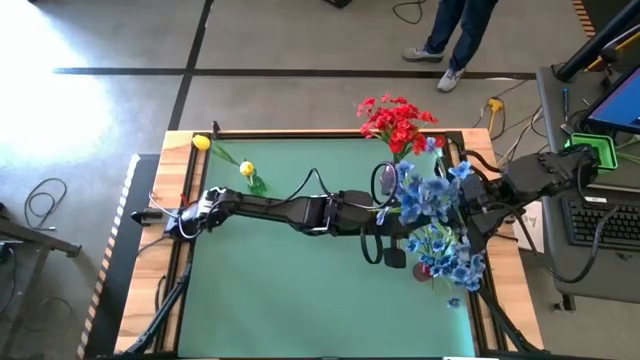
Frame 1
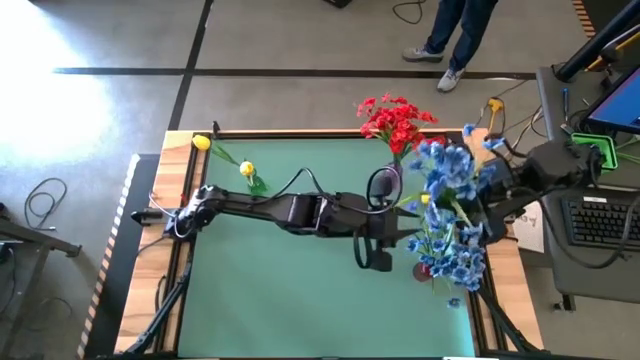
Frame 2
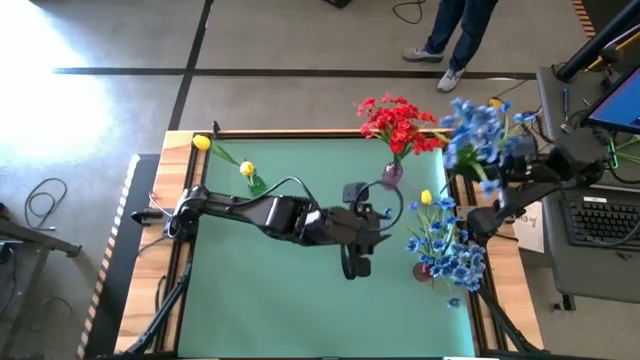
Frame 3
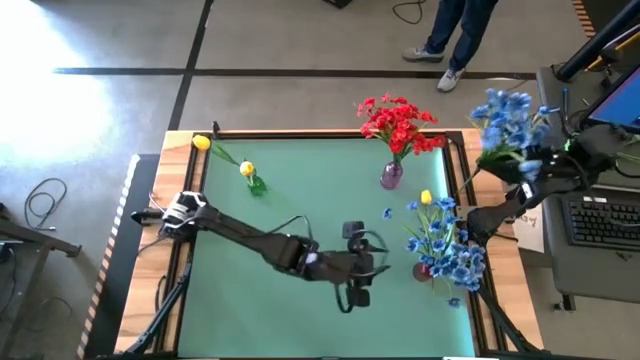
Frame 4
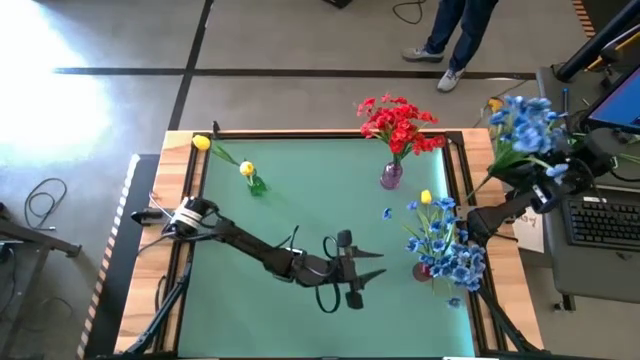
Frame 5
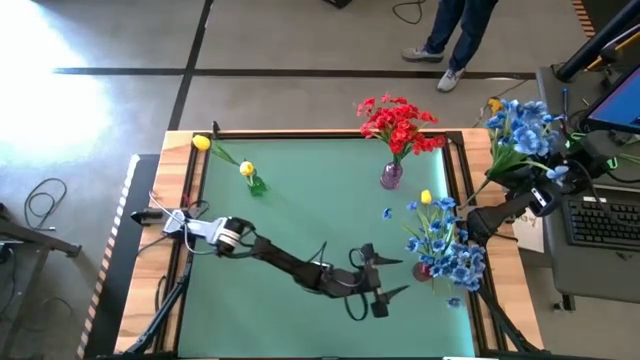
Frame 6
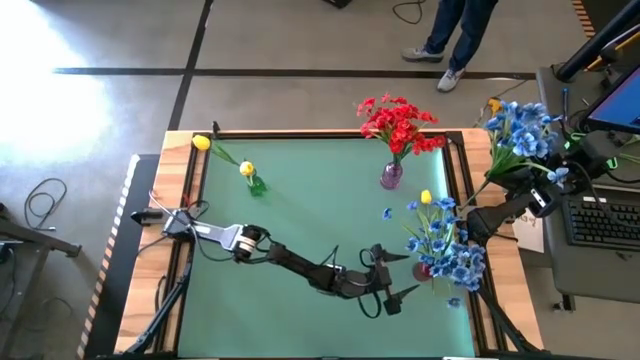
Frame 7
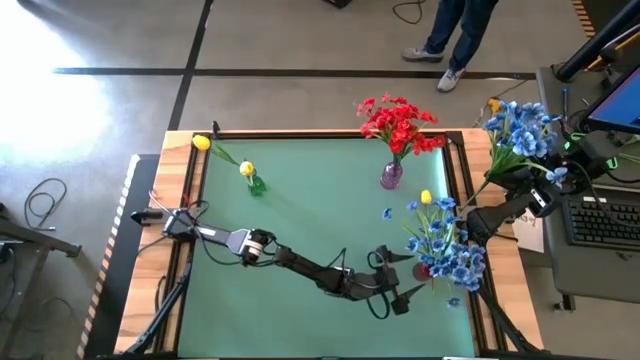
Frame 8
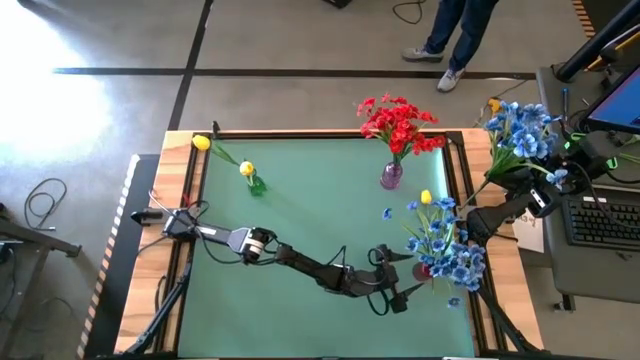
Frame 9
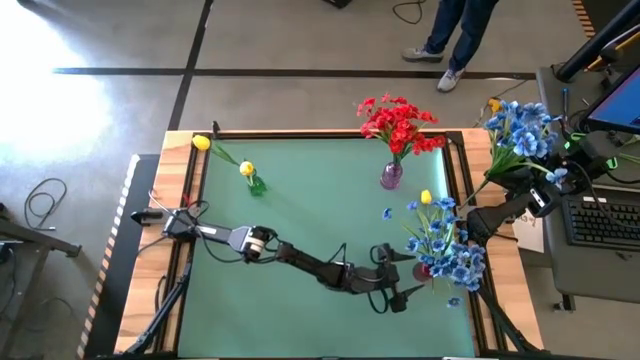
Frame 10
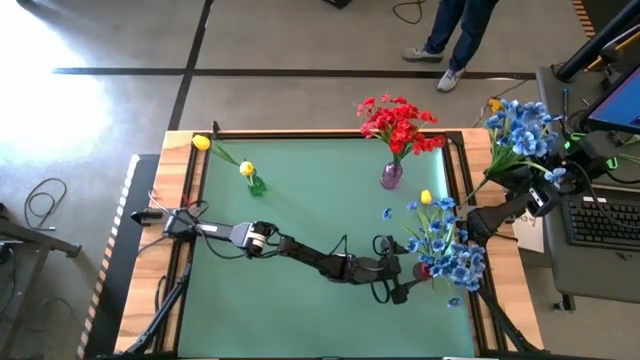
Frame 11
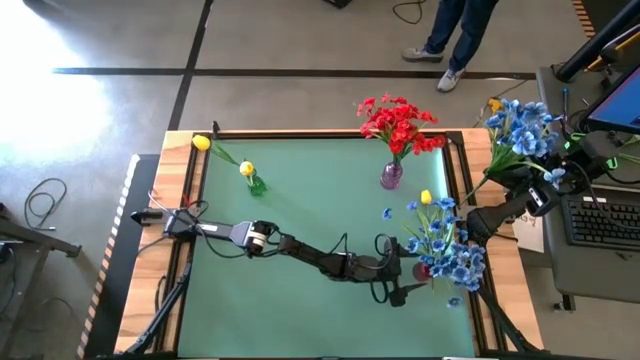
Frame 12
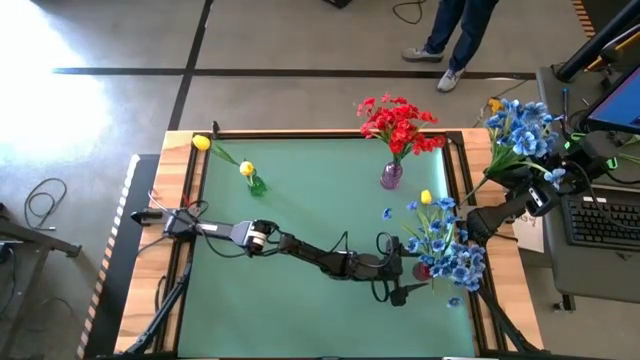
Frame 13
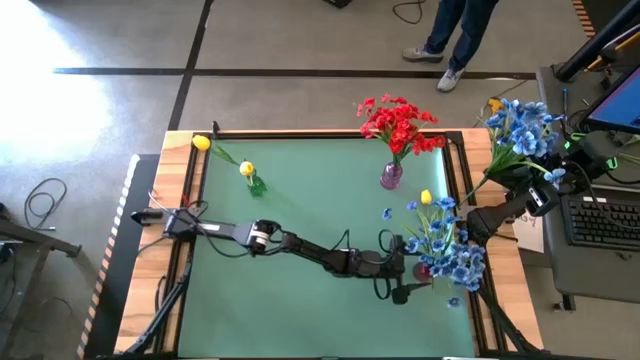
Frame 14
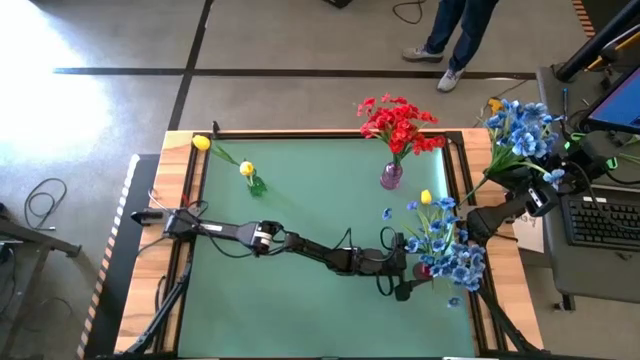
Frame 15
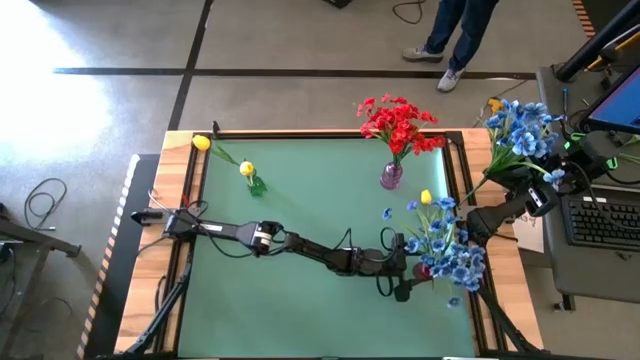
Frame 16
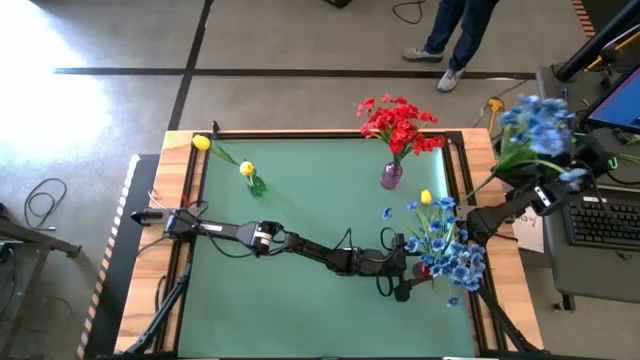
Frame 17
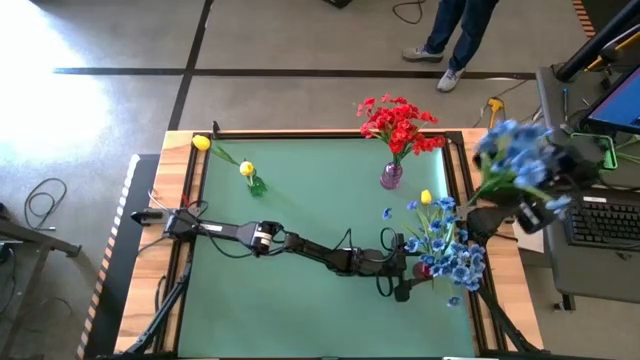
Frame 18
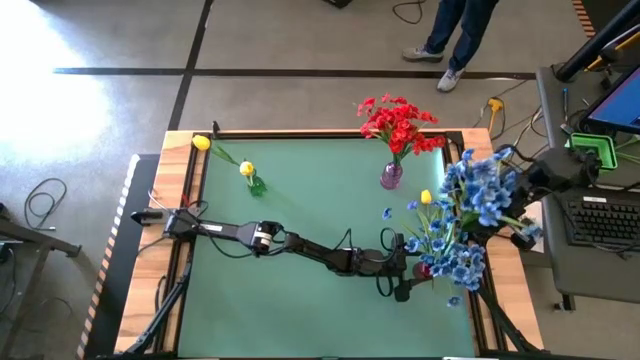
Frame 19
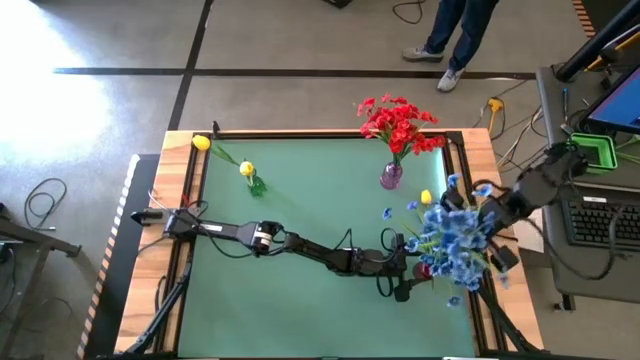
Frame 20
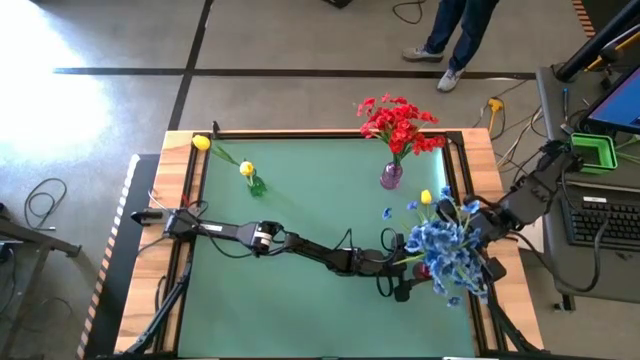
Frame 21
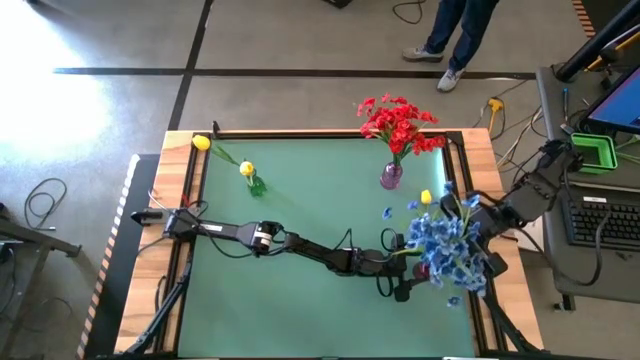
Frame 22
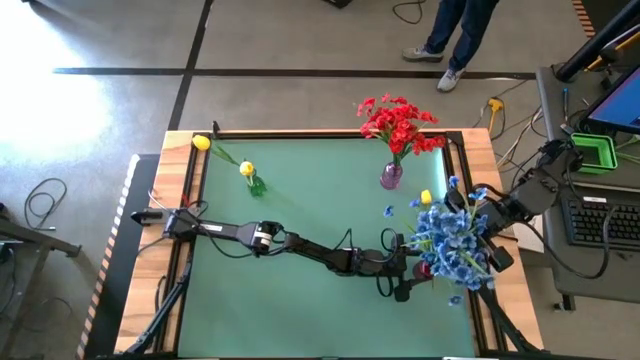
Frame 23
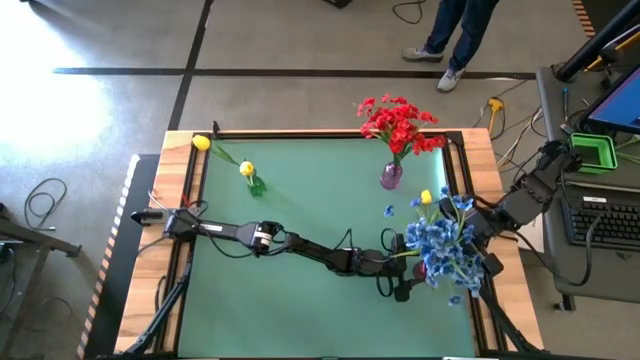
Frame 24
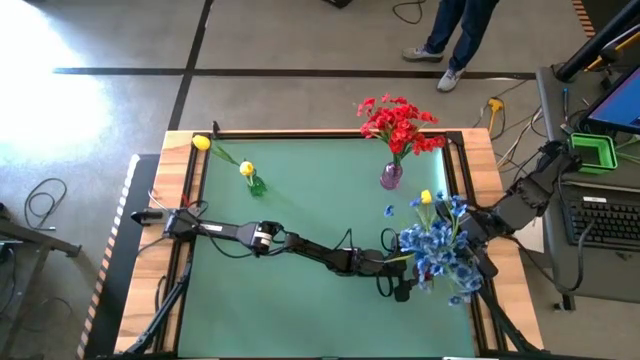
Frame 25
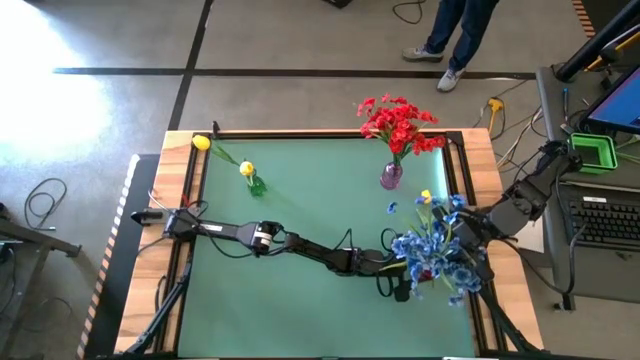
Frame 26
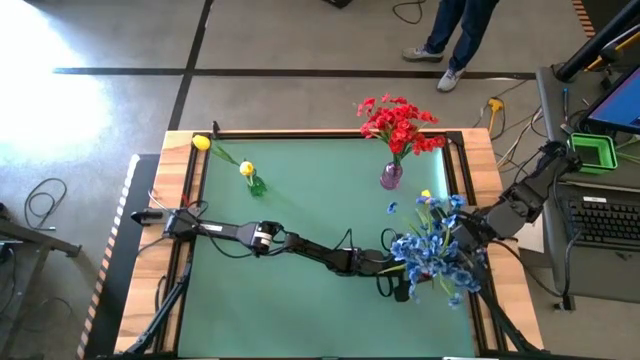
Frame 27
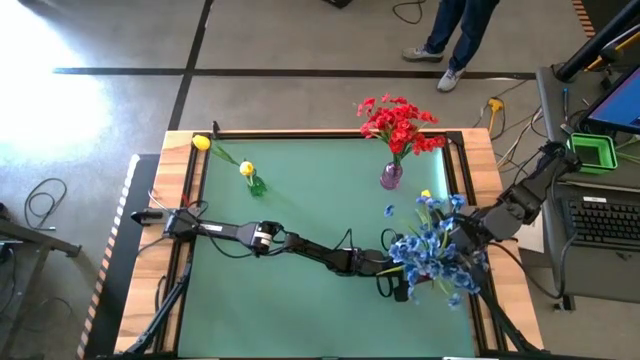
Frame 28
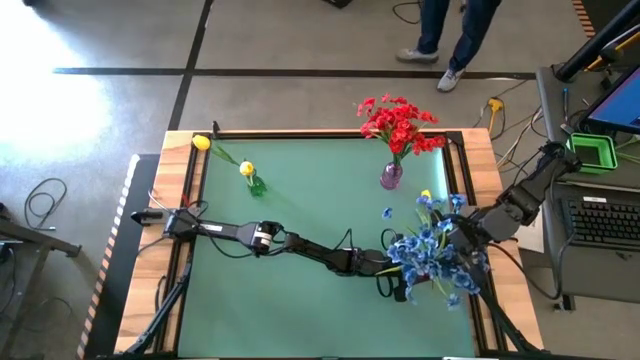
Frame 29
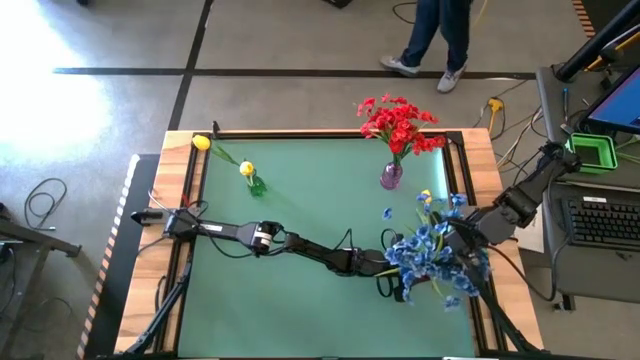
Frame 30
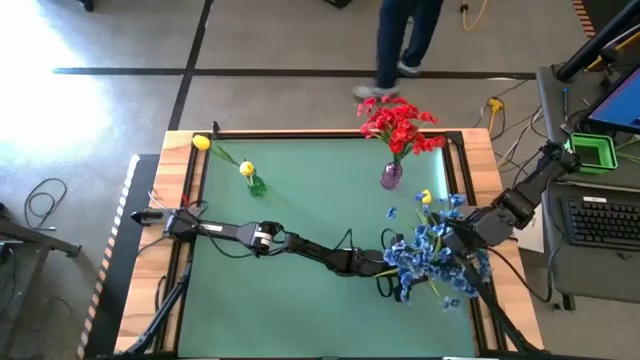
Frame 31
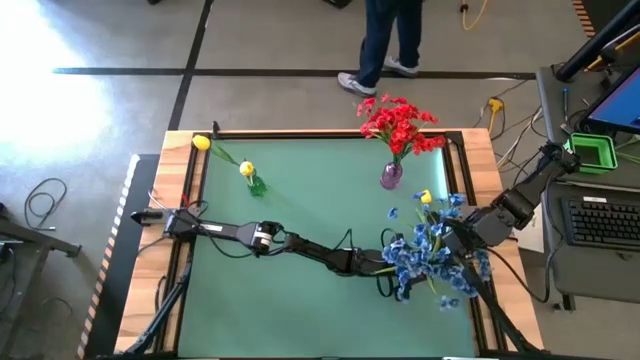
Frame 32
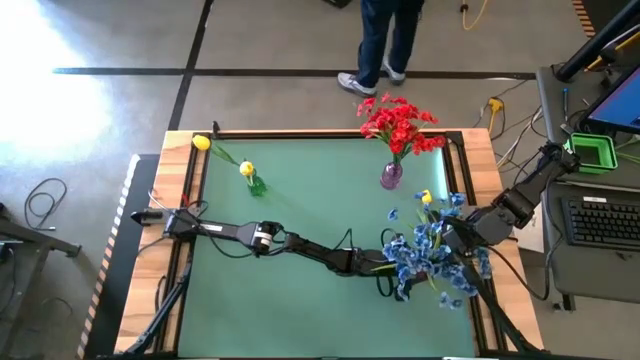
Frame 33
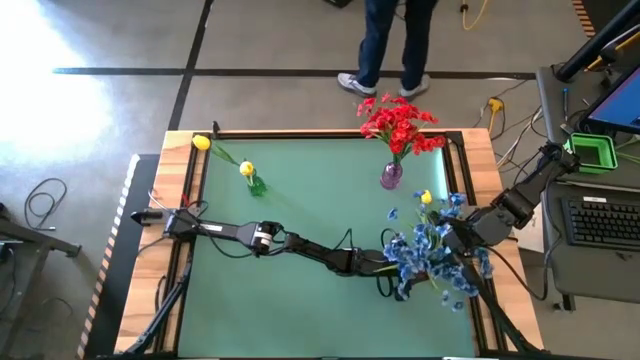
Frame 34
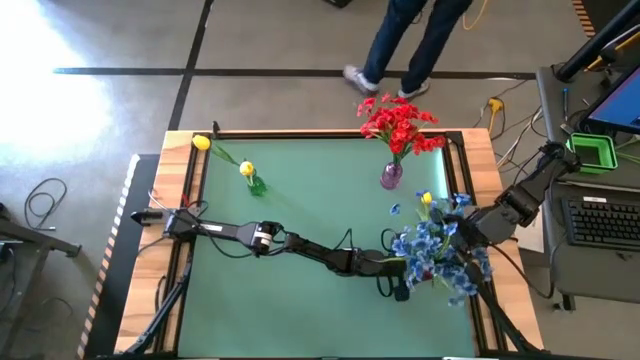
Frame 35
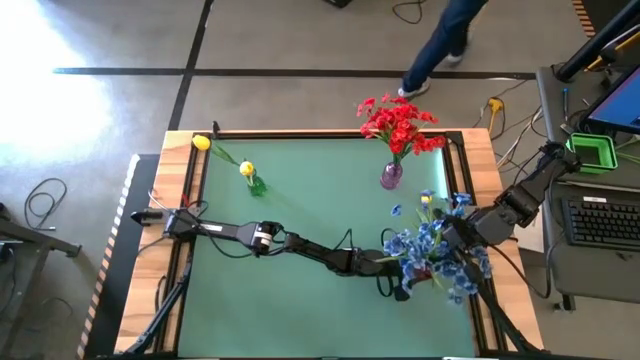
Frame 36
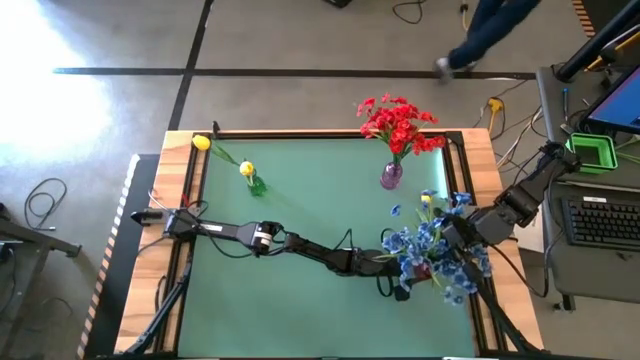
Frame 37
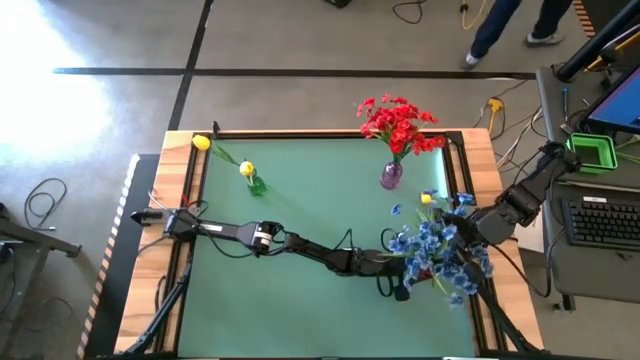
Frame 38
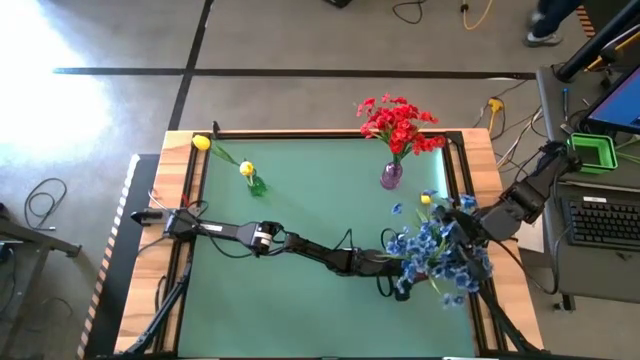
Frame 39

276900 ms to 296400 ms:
Task: Sort flowers into vase by color
Put the blue flower into the red vase

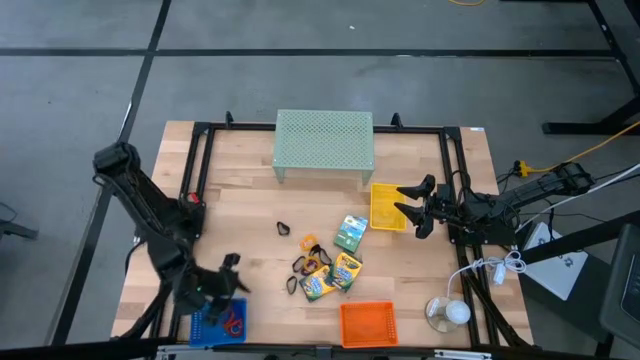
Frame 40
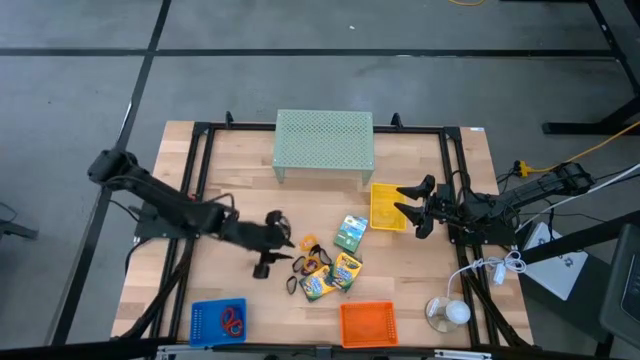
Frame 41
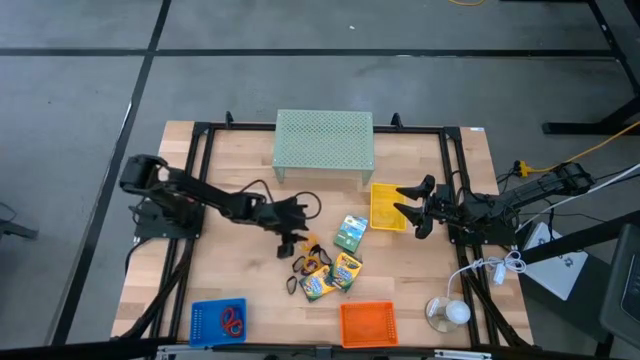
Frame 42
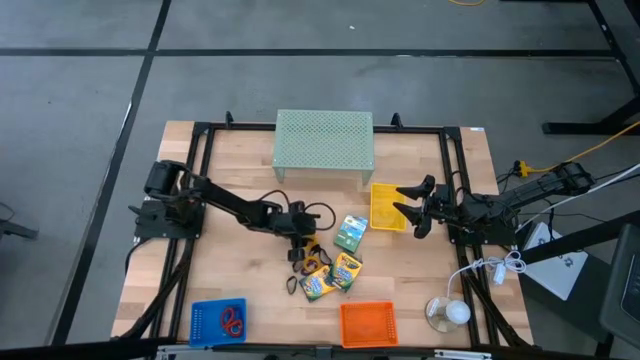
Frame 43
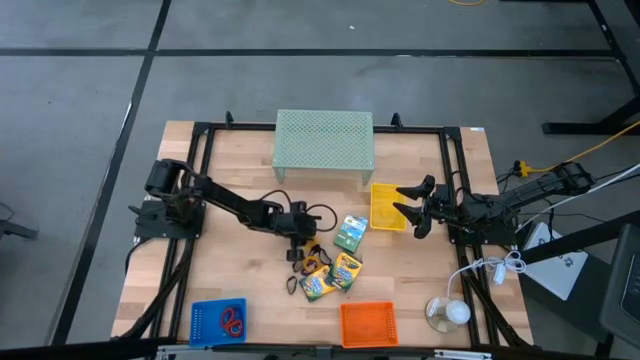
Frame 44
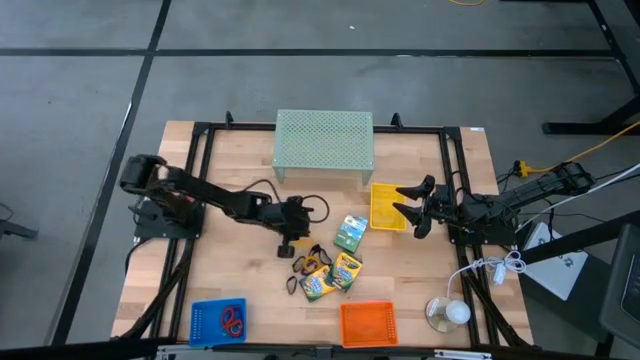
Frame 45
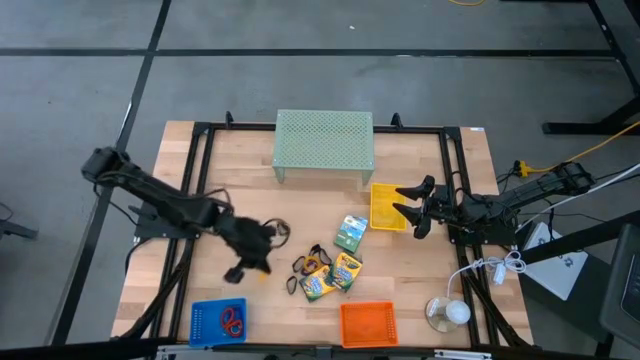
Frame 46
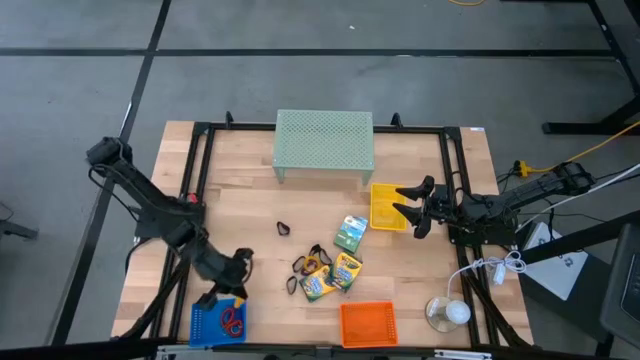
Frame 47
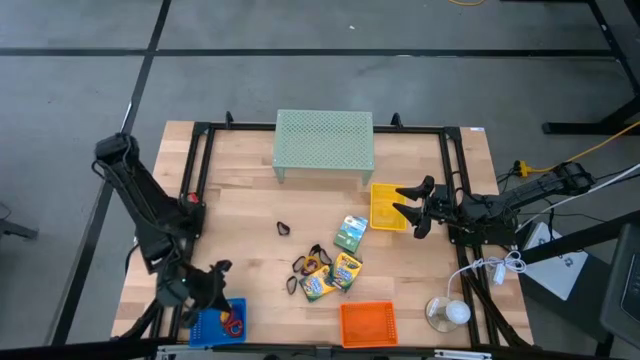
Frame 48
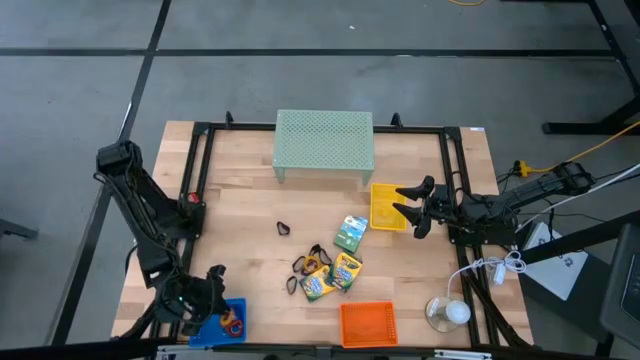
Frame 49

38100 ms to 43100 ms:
Task: Pick & Place Office Desk Supplies
Put the yellow spring keychain into the blue bin
